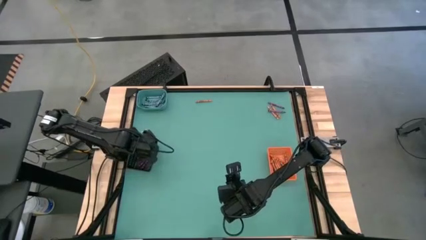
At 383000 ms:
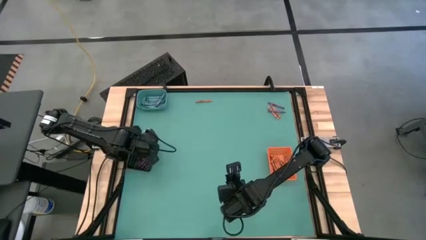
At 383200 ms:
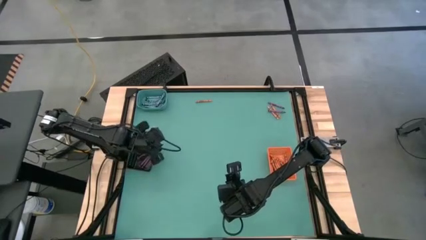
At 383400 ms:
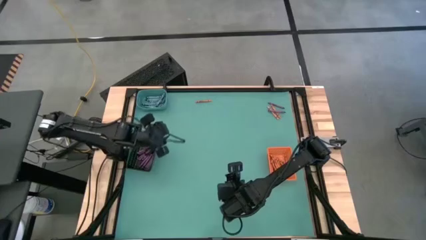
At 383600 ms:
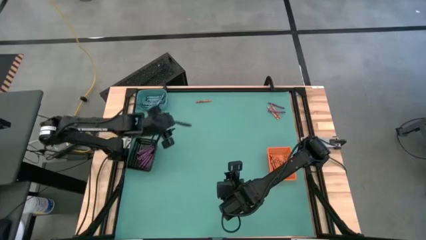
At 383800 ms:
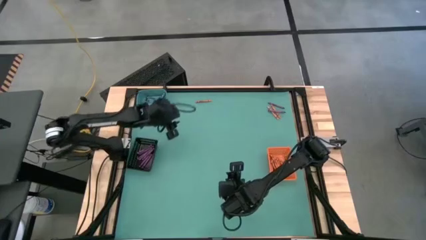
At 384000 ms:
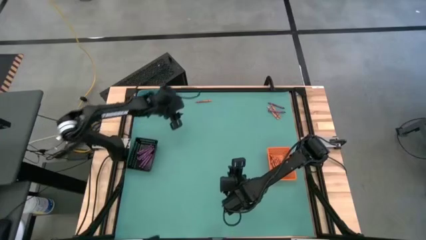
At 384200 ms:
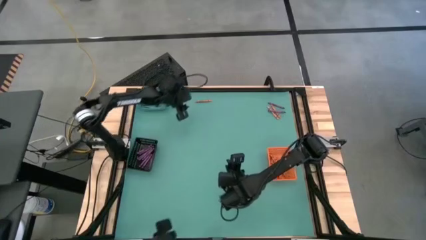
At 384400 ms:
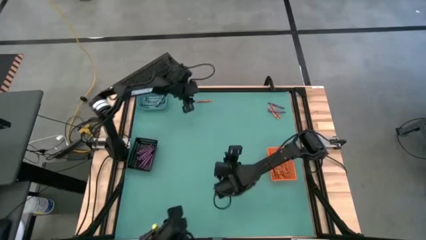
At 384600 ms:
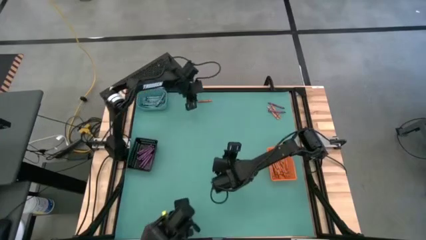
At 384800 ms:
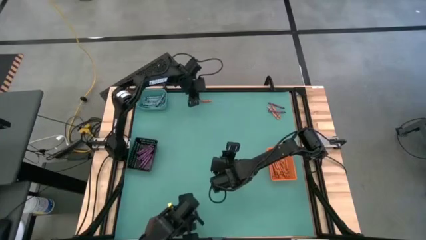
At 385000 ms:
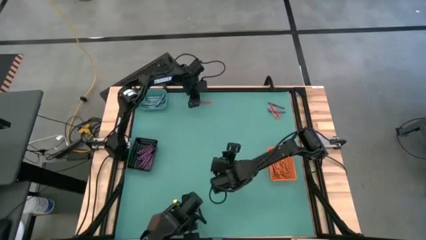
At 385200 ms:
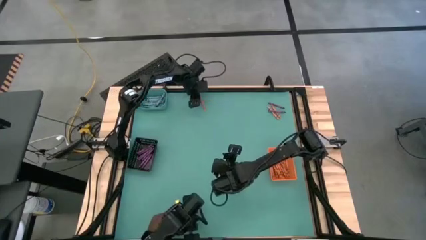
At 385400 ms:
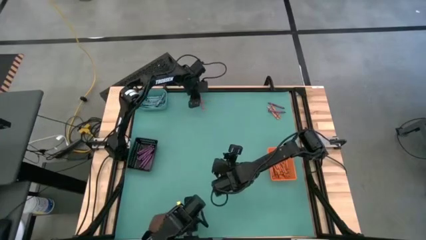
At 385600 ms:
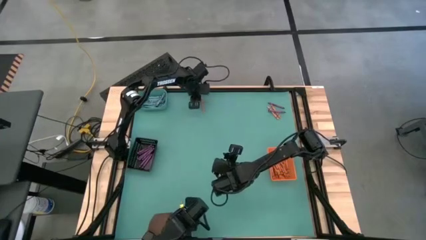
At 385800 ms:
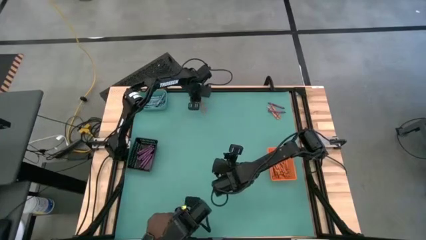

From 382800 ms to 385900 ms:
Task: Sort crayons
Put the orange crayon into the orange bin

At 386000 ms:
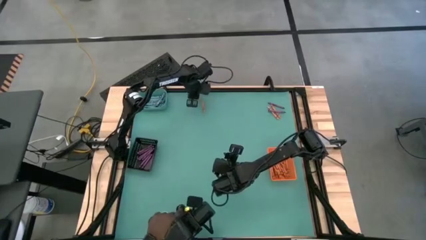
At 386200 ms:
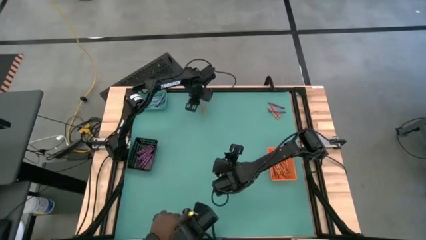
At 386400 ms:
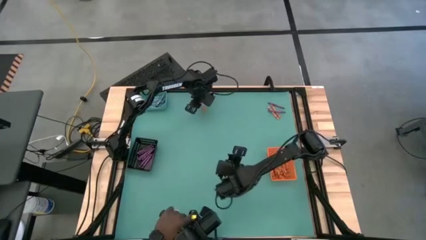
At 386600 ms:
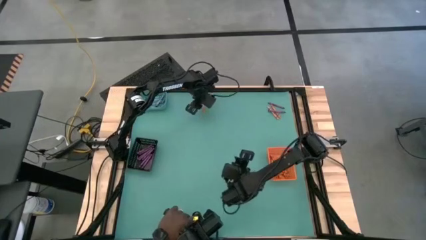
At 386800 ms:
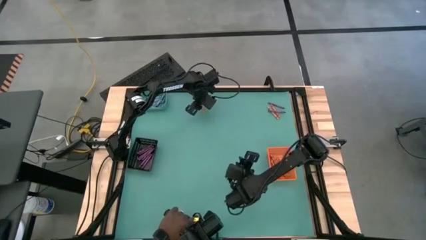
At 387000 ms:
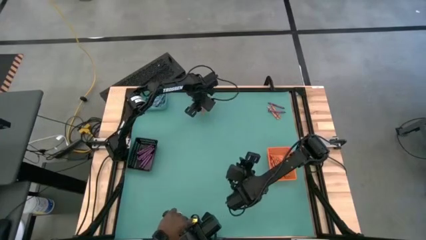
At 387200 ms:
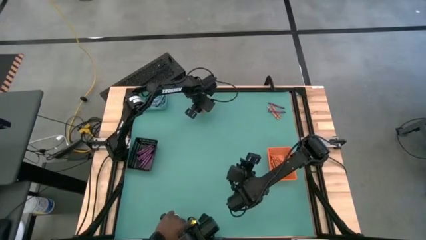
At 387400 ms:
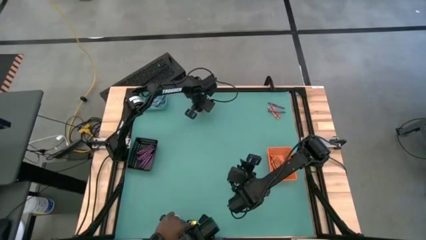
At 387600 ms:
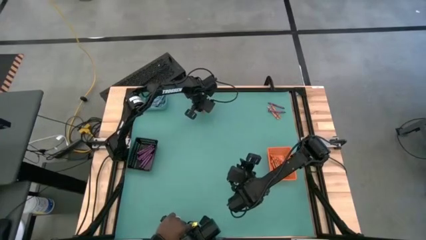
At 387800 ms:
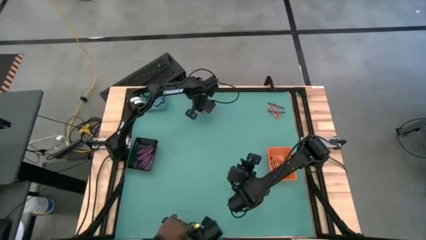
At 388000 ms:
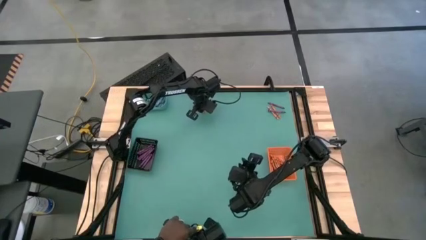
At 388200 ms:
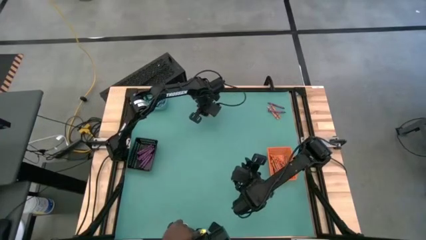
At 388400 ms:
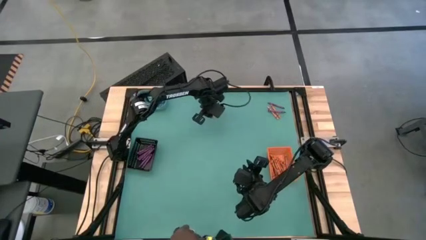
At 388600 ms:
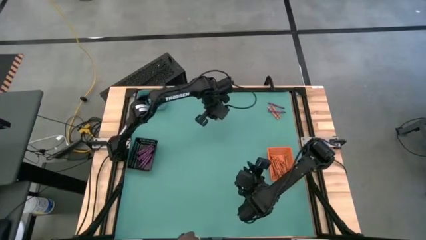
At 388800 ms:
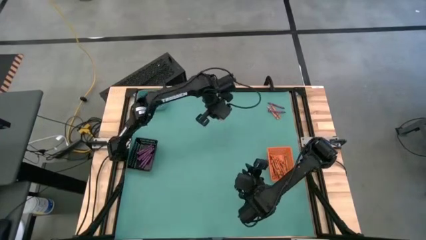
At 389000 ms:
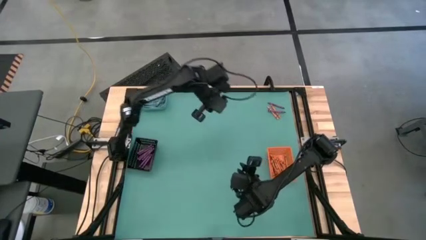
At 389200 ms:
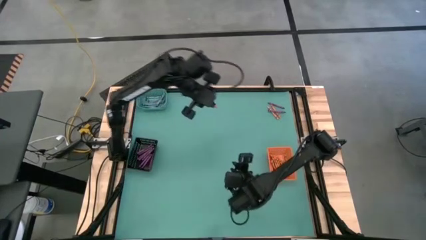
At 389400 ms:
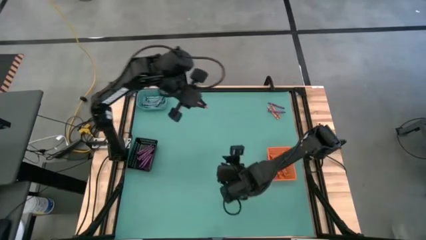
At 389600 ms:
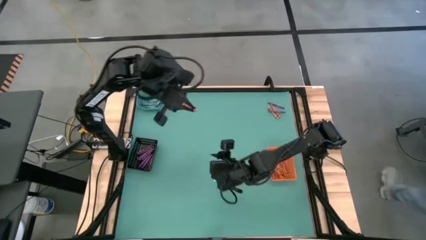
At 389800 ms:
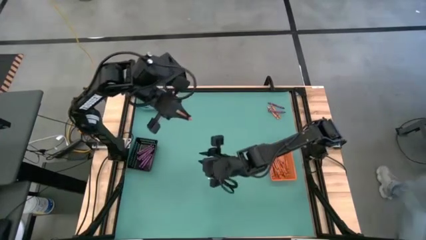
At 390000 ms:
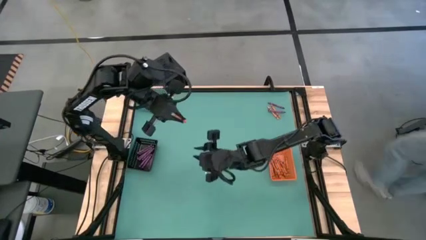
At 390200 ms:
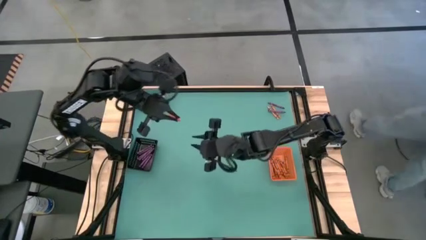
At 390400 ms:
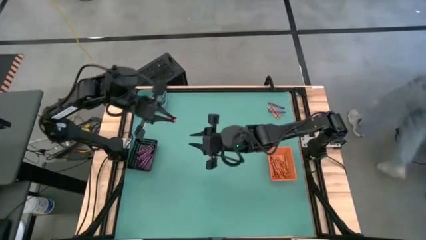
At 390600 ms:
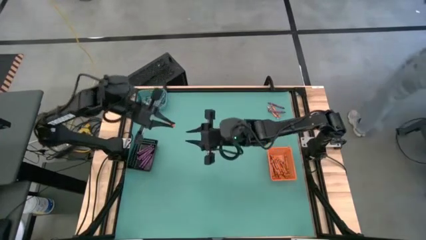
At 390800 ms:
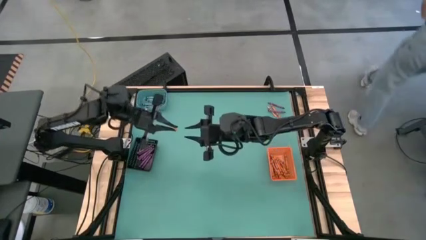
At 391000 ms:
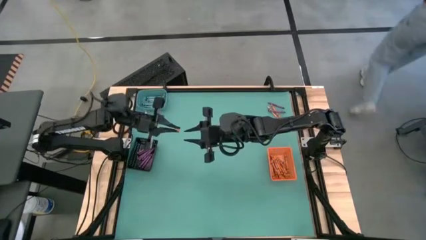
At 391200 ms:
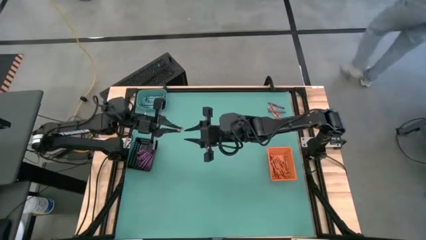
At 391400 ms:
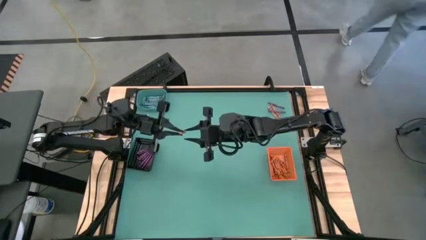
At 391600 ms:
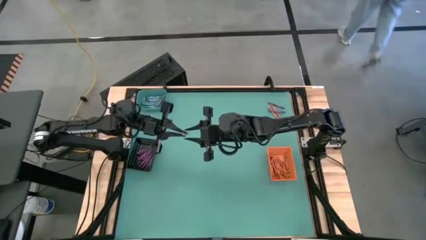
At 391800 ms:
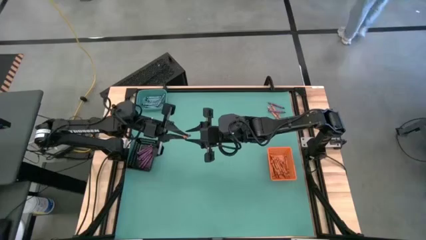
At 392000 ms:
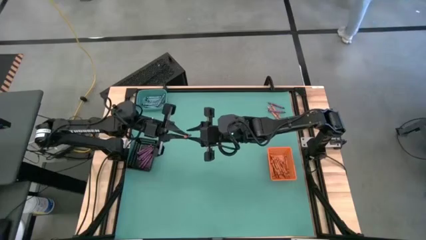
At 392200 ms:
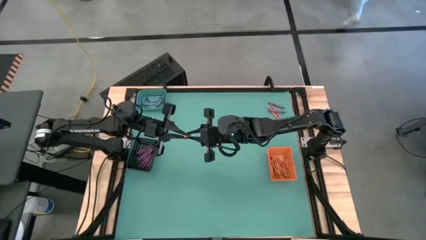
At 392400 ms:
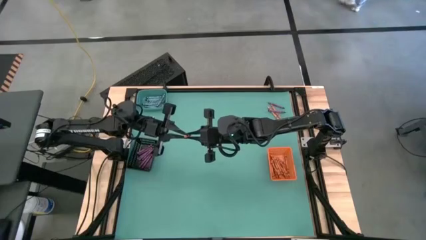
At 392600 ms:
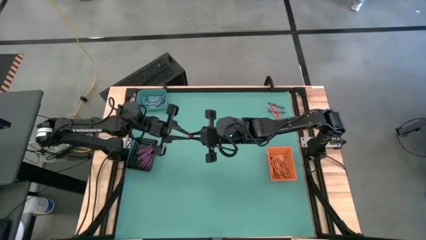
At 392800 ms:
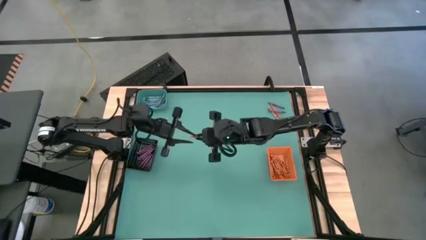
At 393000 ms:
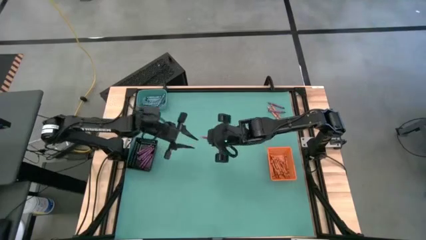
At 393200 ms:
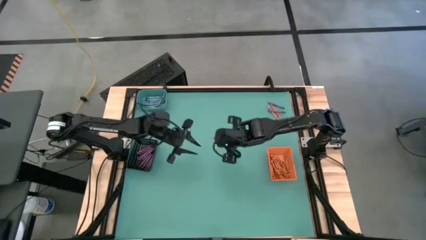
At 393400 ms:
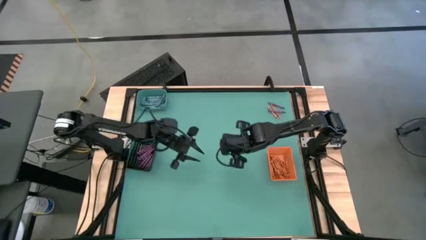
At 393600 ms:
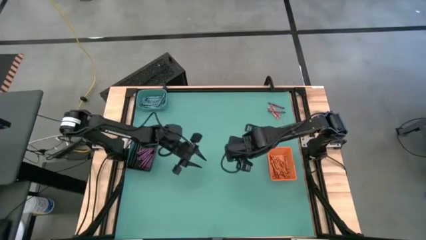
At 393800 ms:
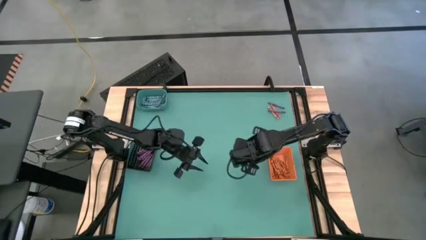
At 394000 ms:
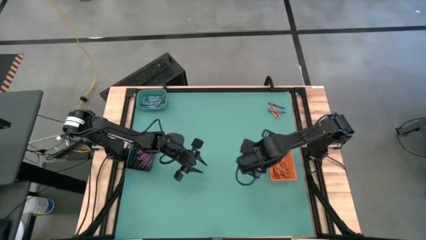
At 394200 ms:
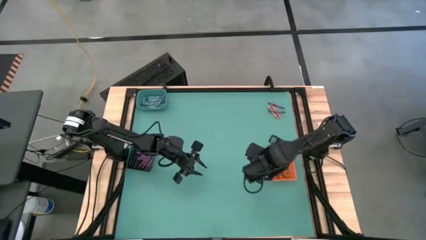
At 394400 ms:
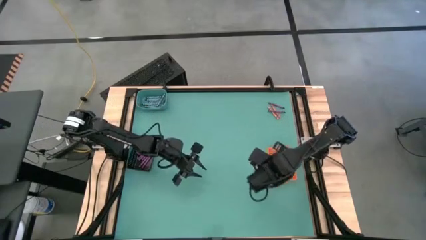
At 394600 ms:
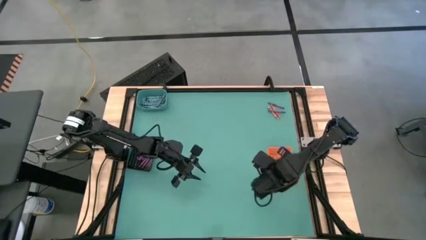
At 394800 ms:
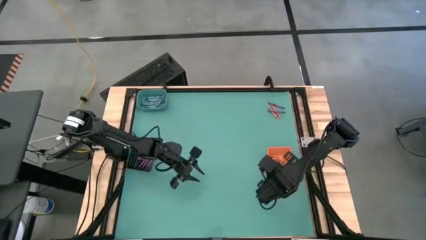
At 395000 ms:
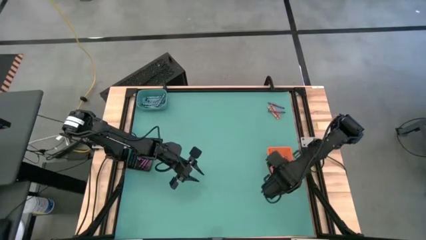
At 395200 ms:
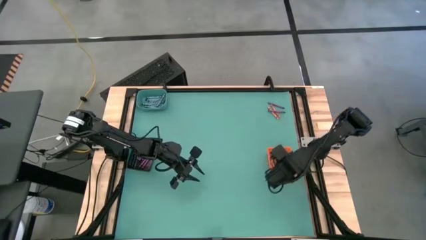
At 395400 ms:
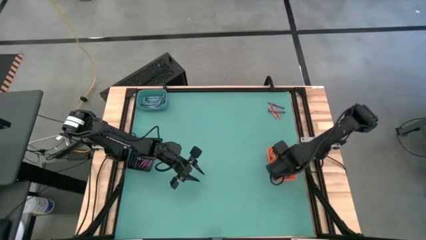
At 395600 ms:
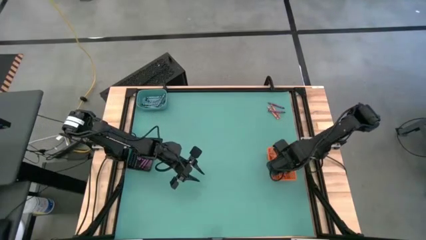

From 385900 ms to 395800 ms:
Put the orange crayon into the orange bin

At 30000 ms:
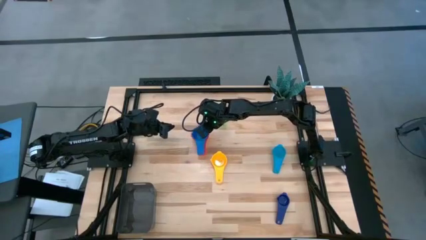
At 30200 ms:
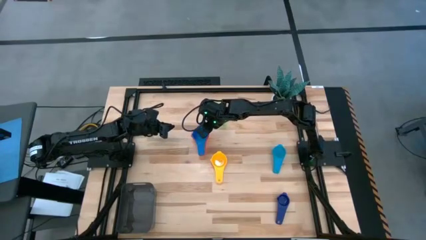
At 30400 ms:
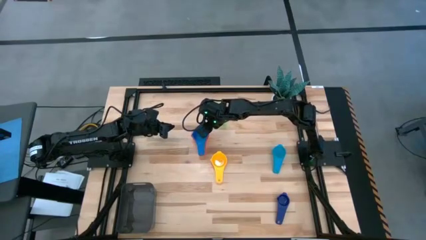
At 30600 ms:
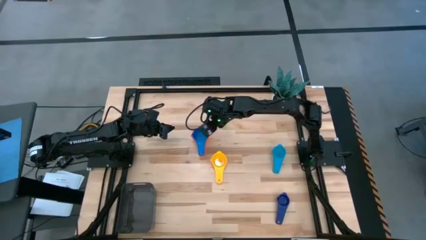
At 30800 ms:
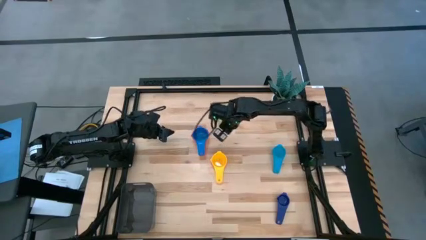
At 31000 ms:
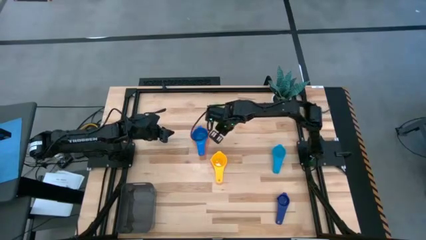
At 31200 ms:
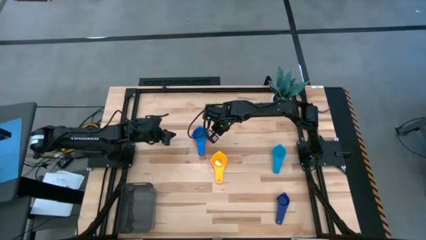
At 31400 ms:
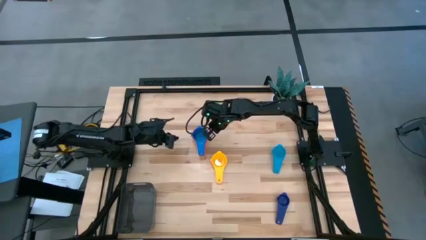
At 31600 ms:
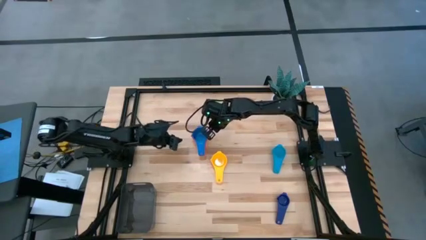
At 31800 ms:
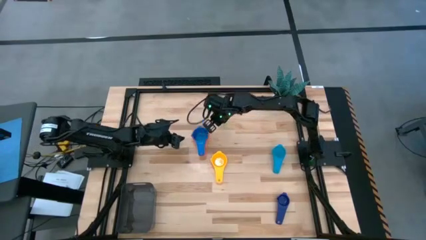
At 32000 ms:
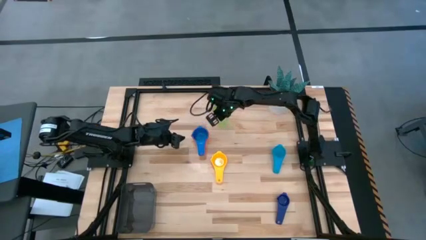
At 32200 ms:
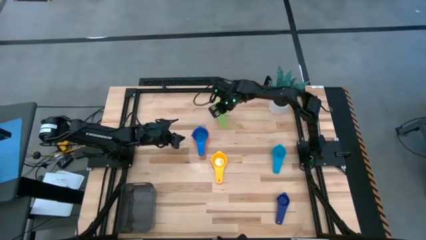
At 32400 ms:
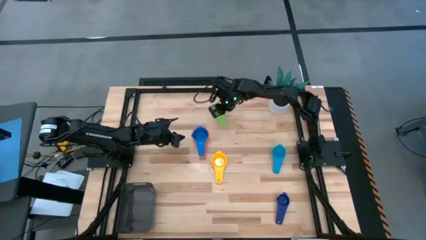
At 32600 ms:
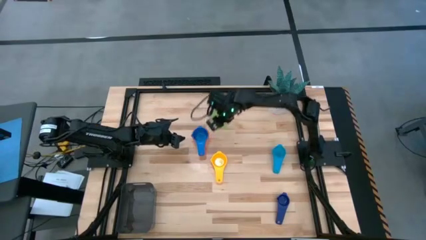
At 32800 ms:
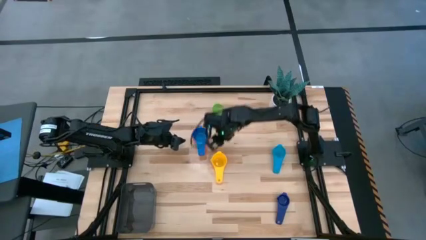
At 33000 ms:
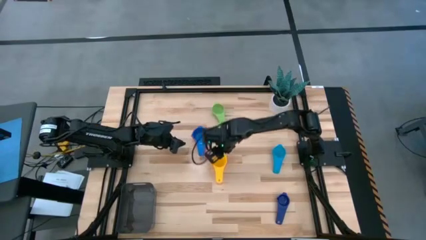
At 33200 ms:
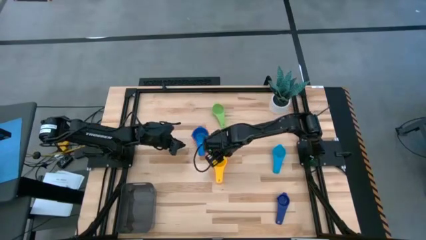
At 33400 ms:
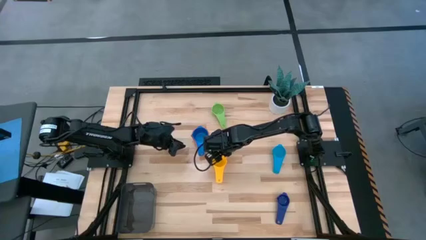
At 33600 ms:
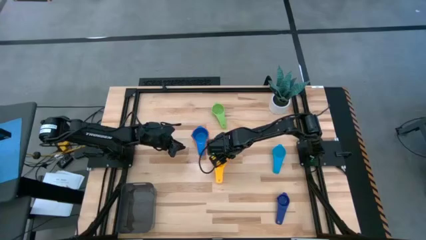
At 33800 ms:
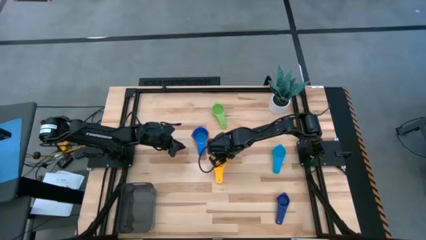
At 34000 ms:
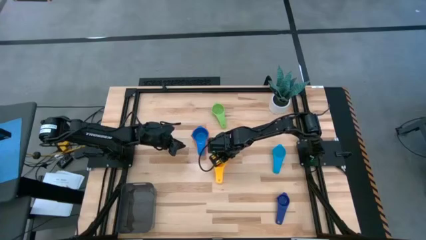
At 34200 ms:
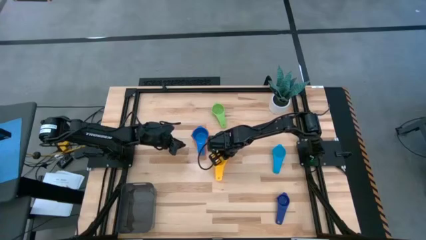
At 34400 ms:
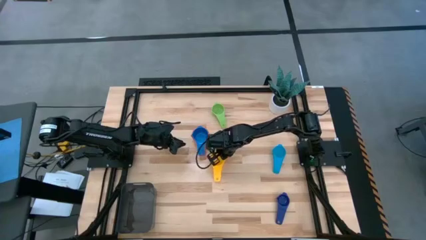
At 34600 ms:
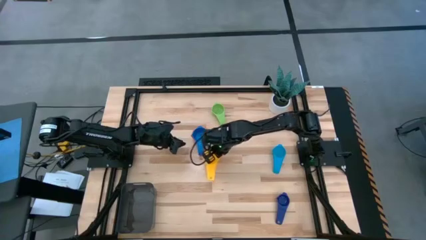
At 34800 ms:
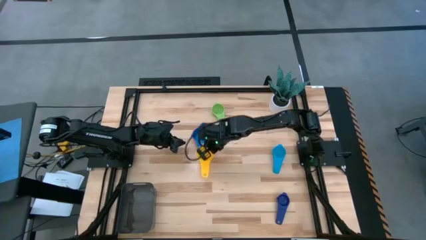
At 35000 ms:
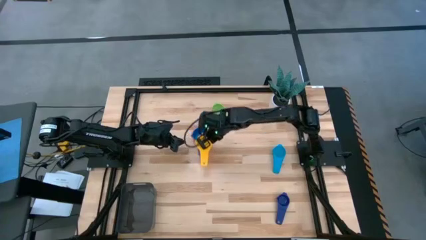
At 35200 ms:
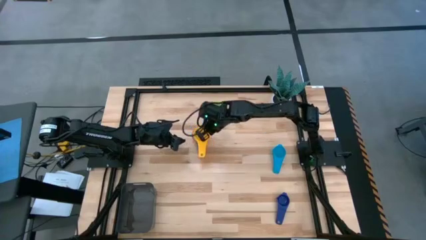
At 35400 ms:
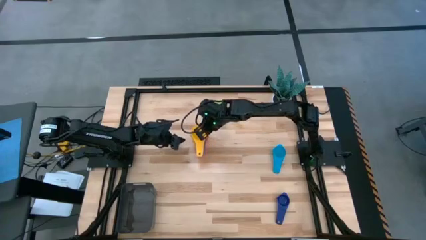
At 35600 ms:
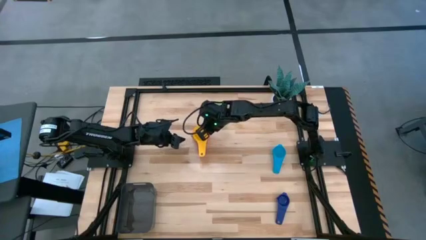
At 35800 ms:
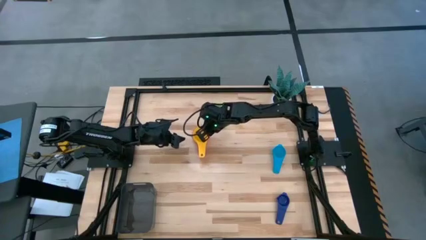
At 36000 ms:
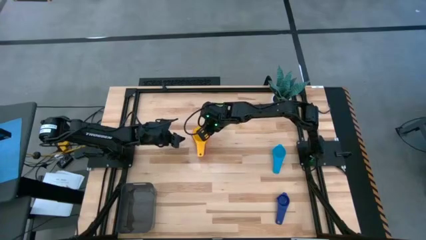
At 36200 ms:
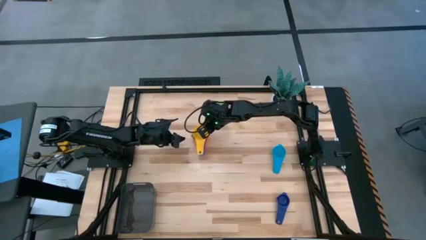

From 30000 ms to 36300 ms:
Task: Nest measuring cups in basket
Stack the yellow measuring cup on top of the dark blue measuring cup
